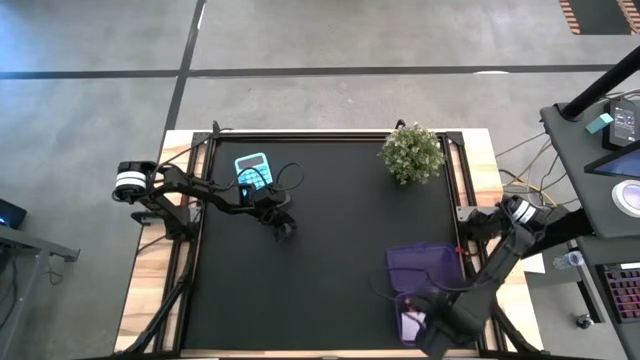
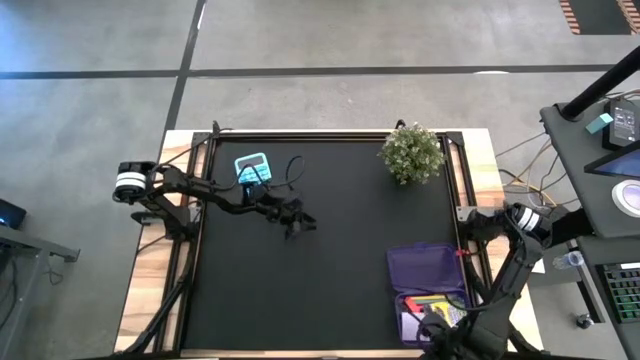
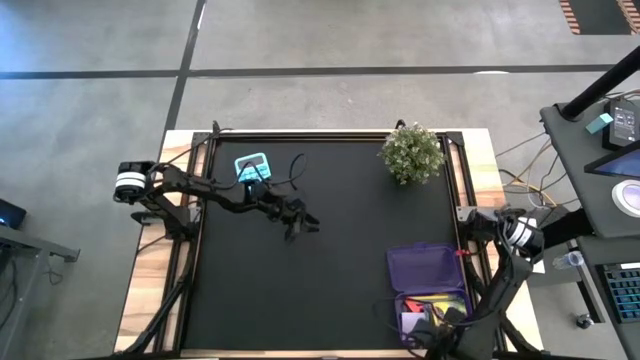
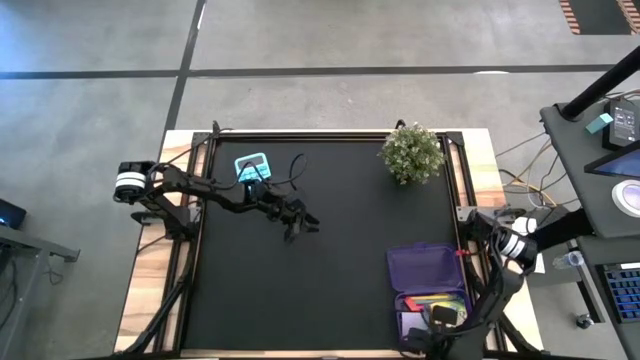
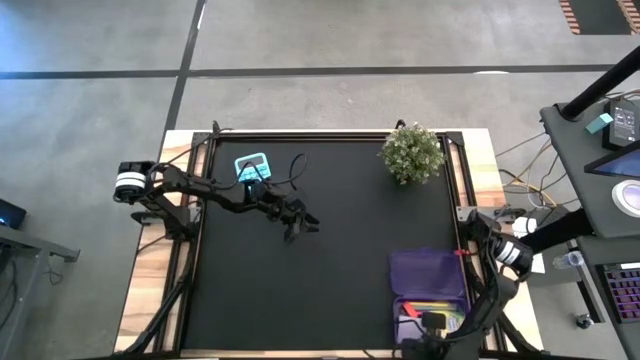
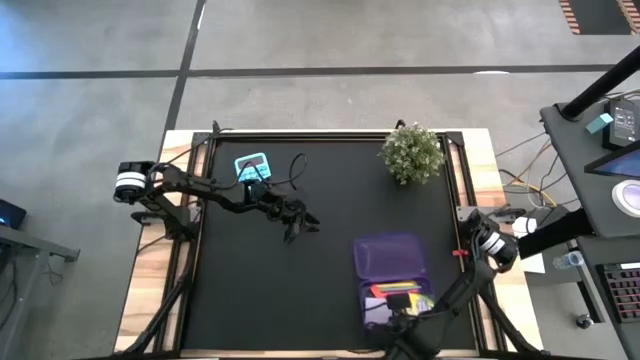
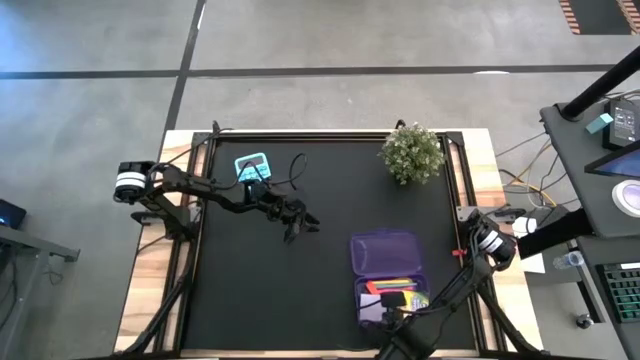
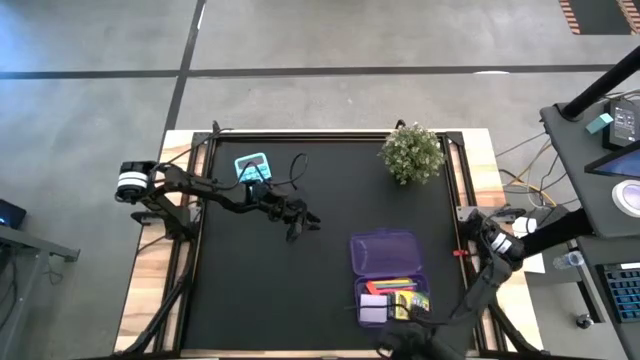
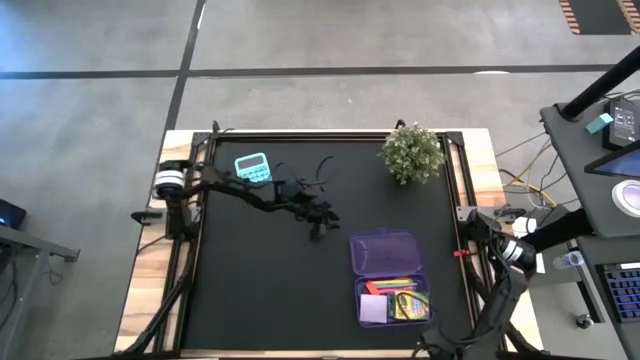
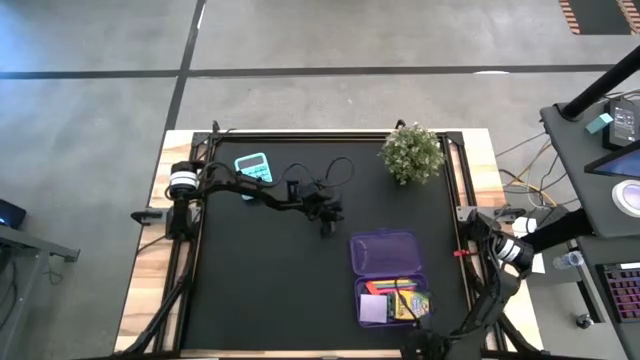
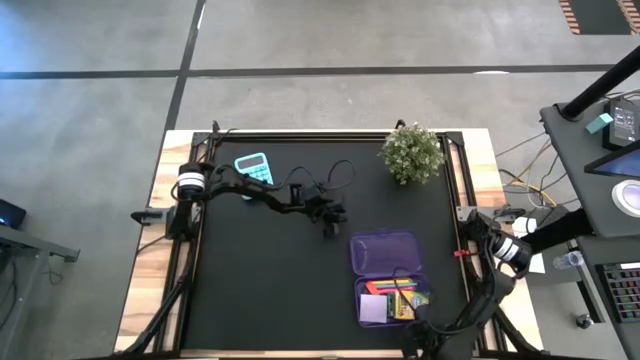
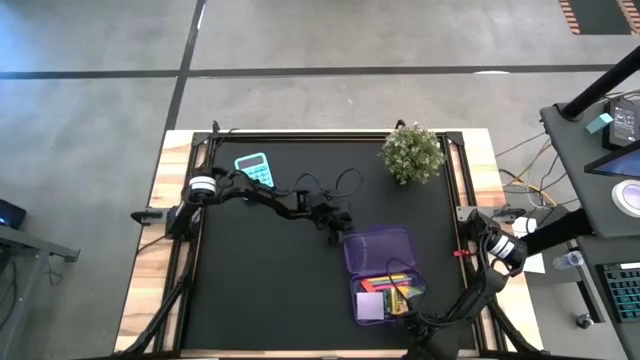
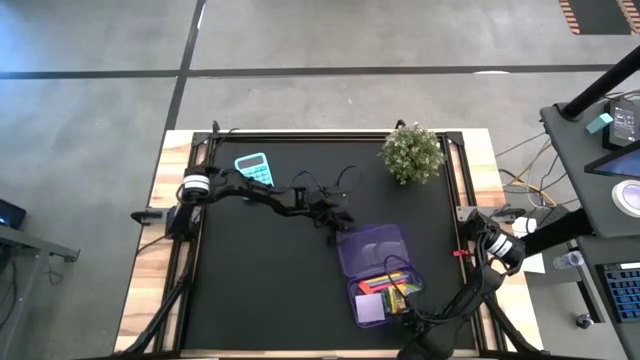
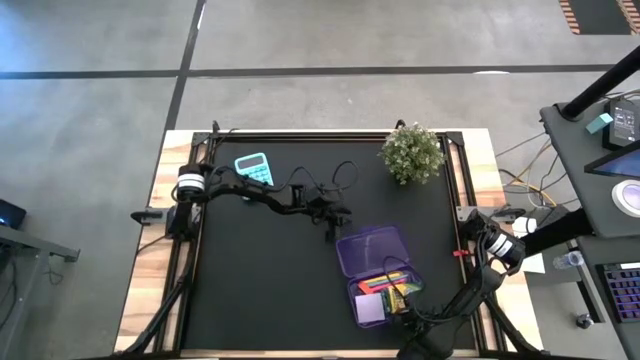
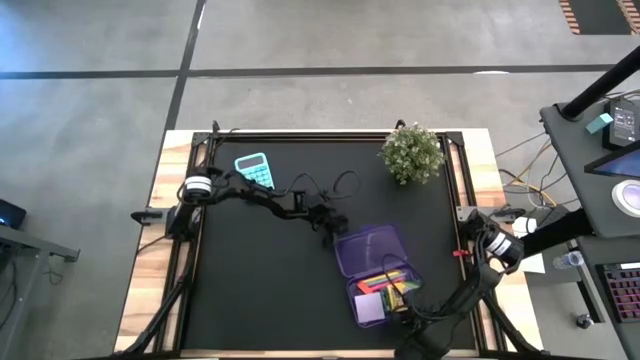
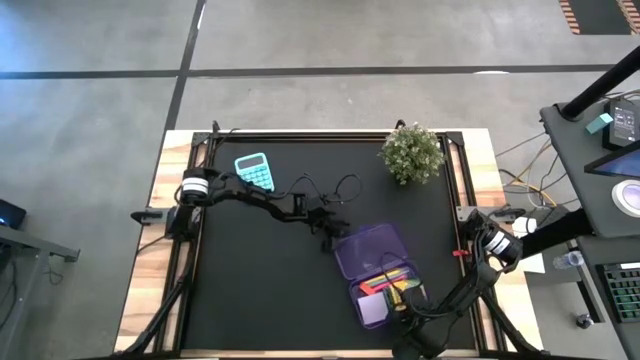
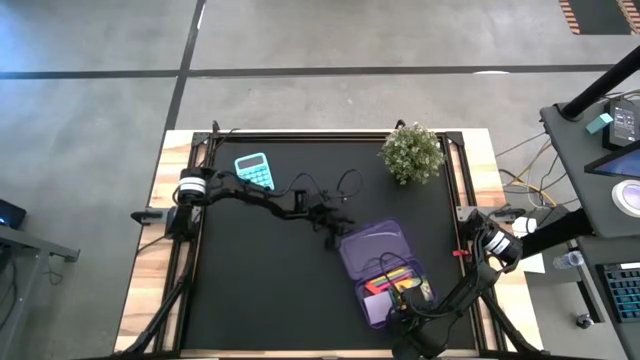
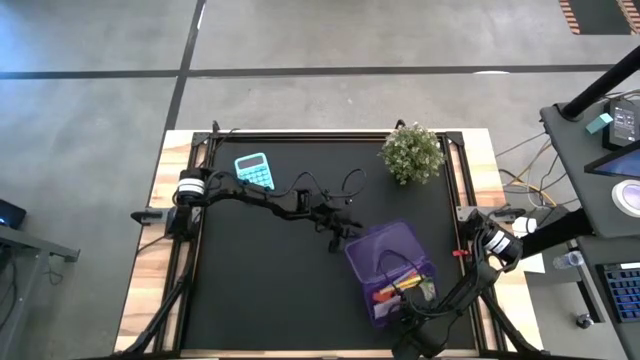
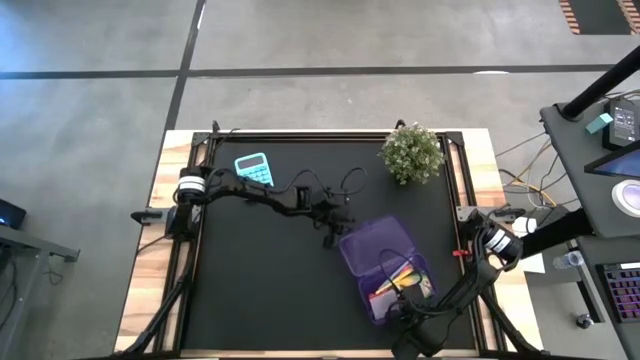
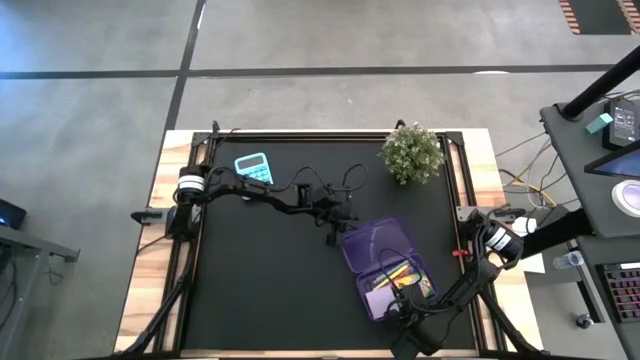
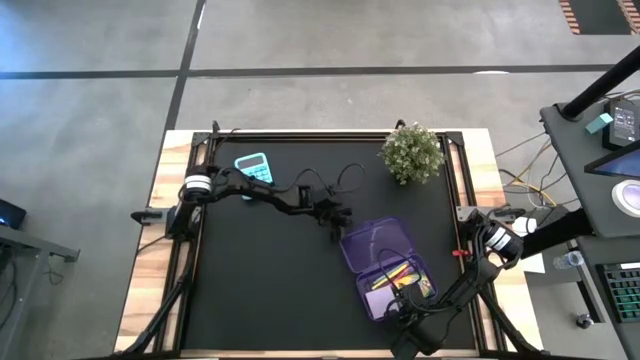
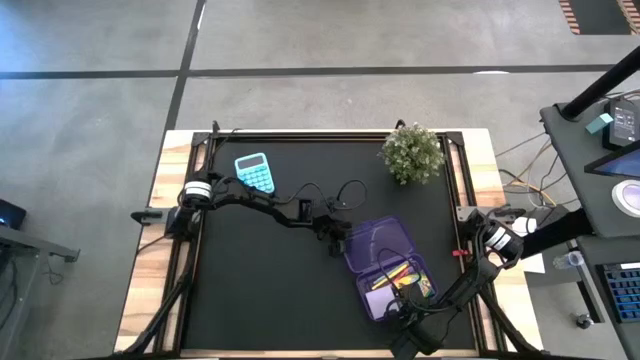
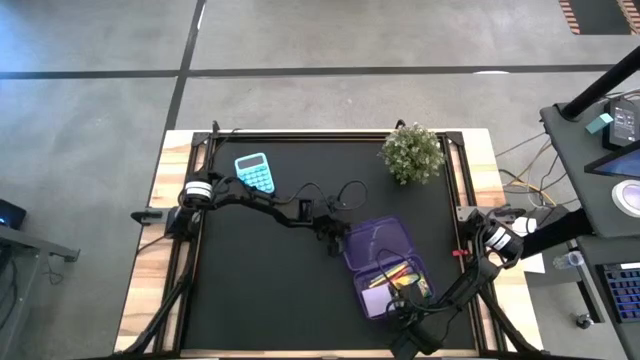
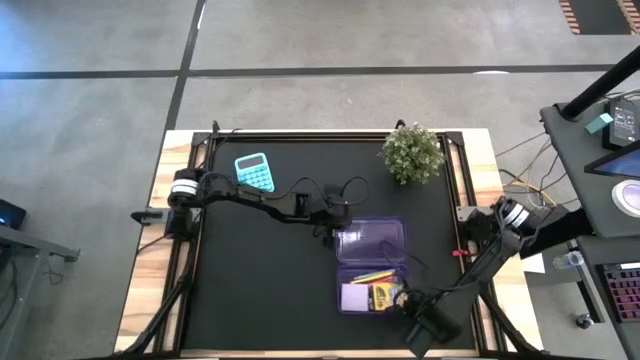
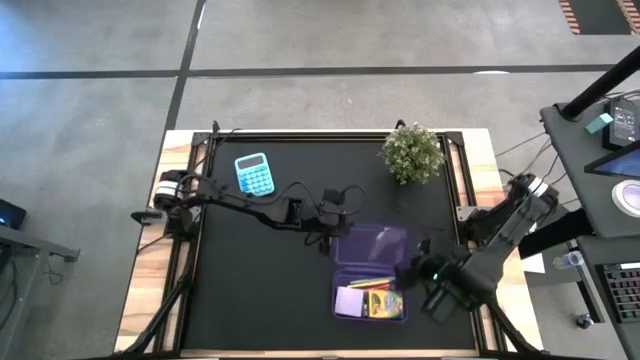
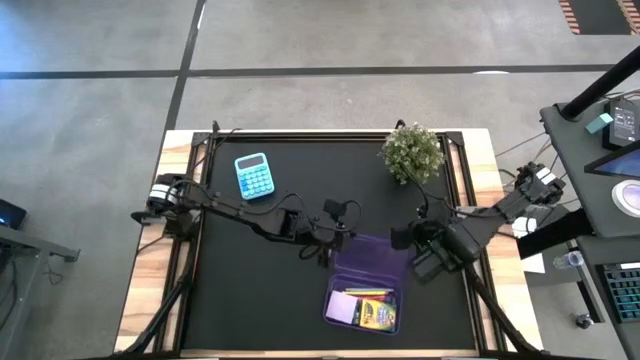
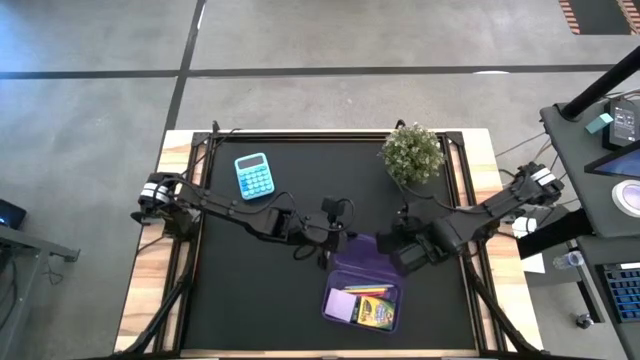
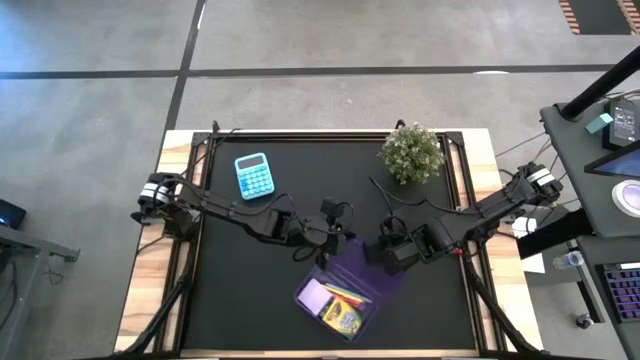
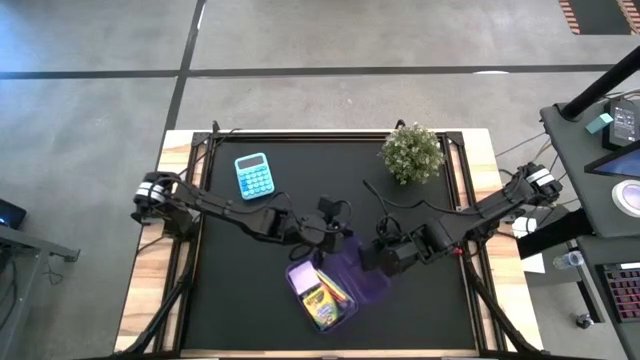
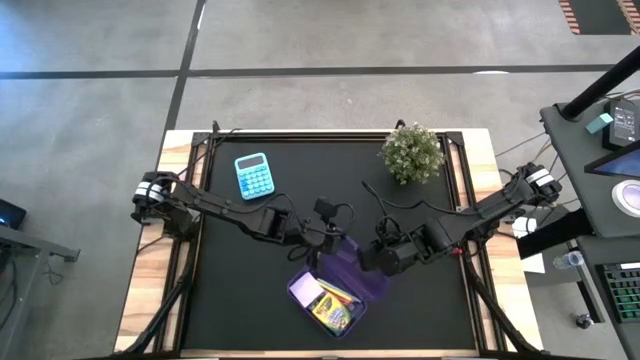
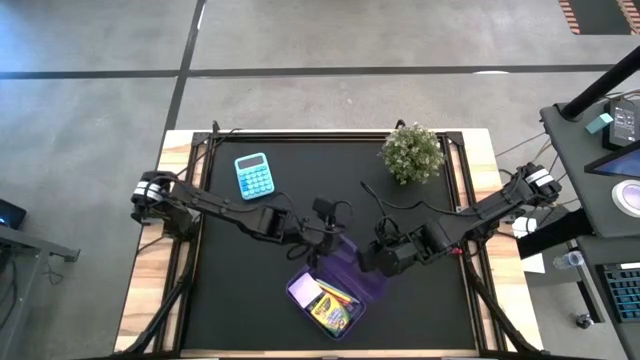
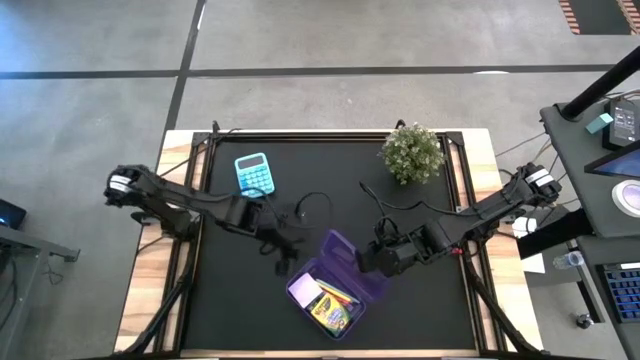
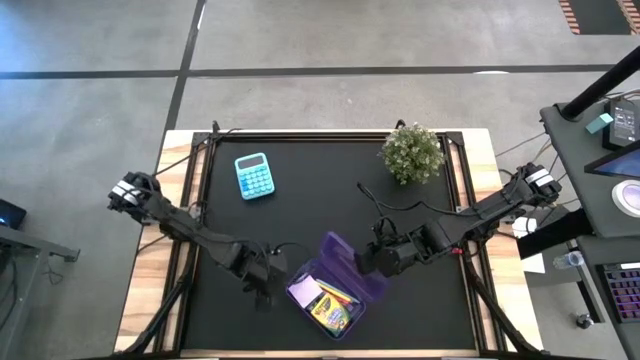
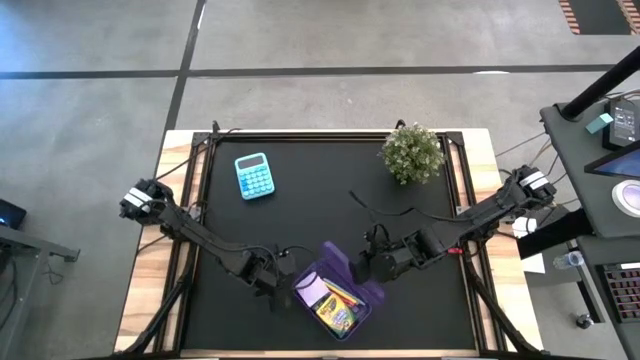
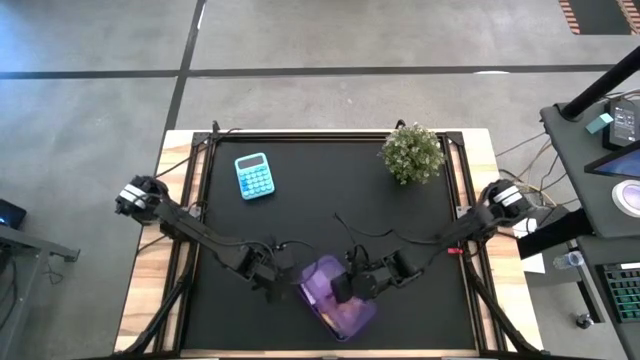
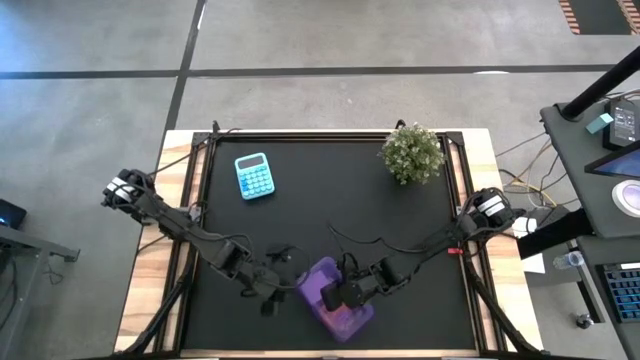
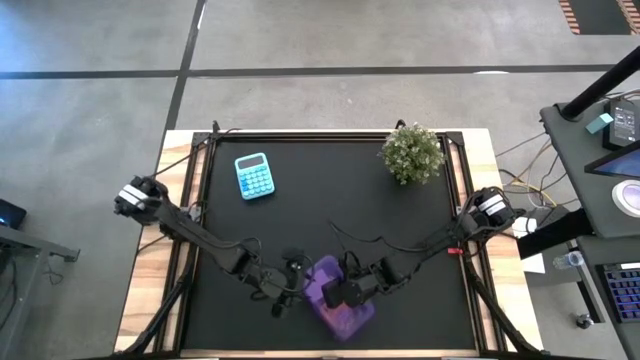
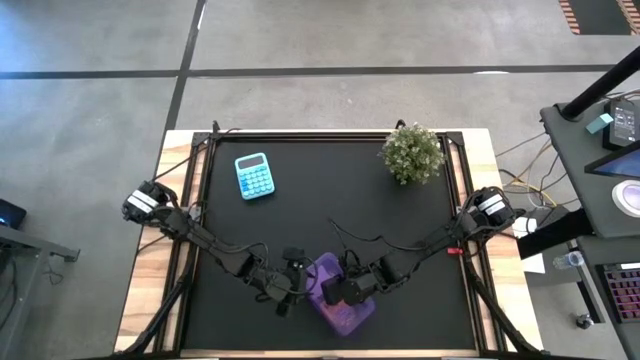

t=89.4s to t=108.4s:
Task: Pack school essentials
Close the supply box

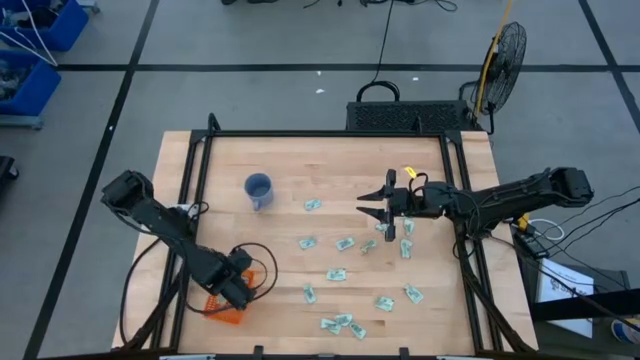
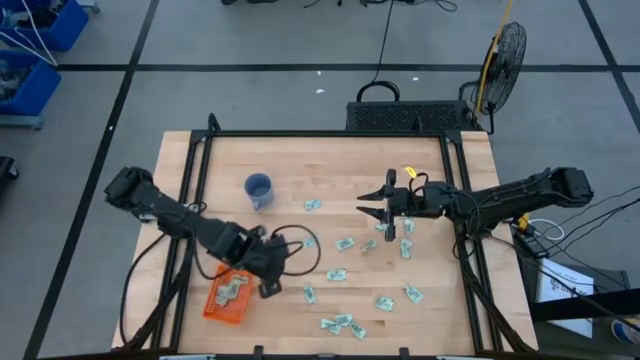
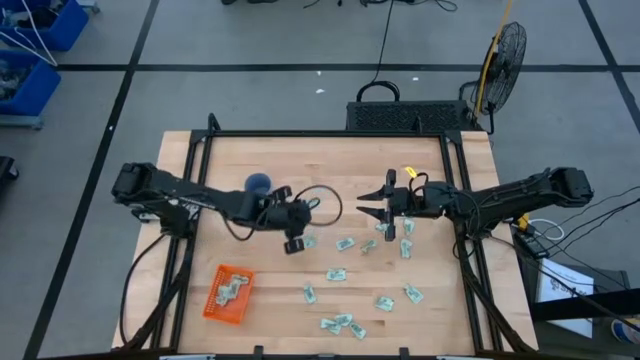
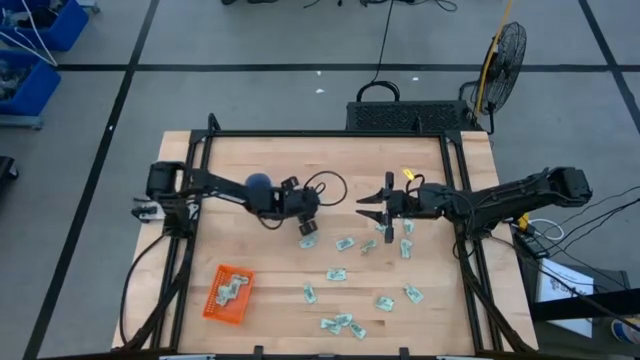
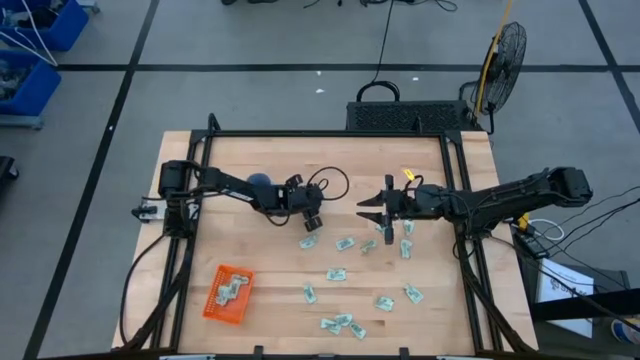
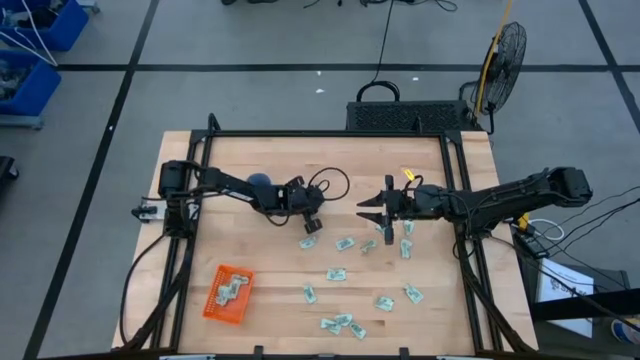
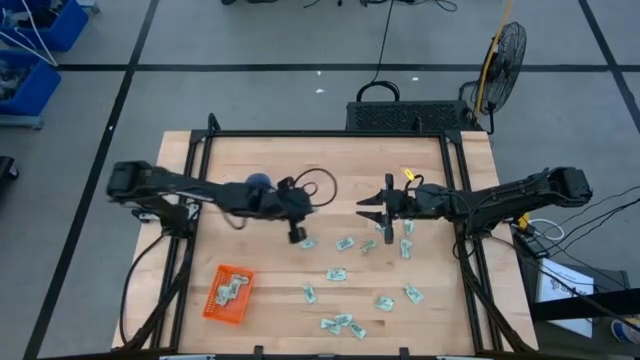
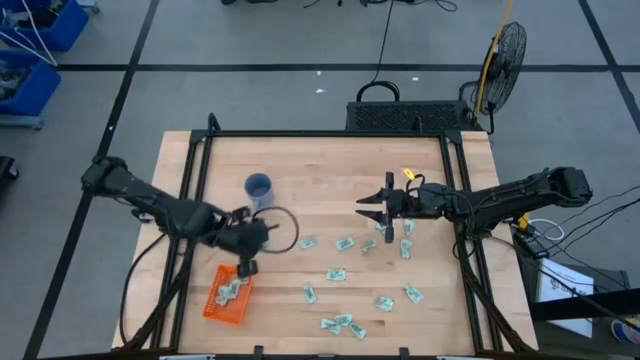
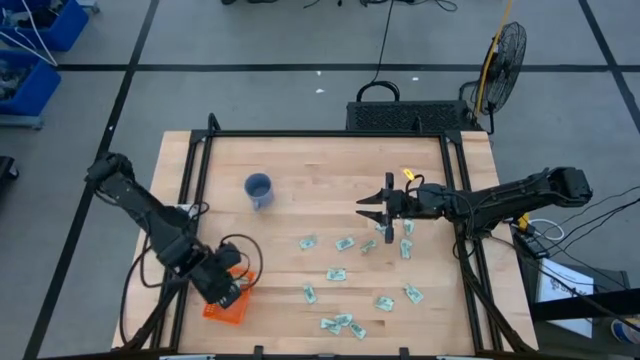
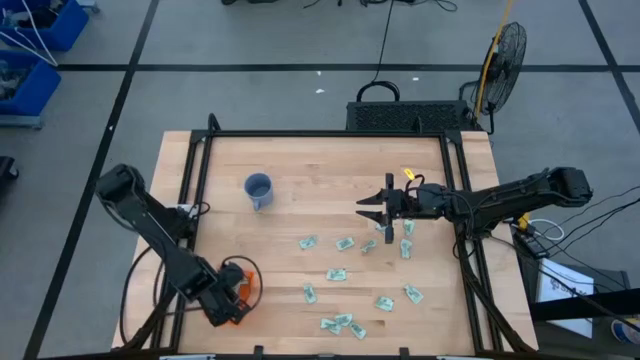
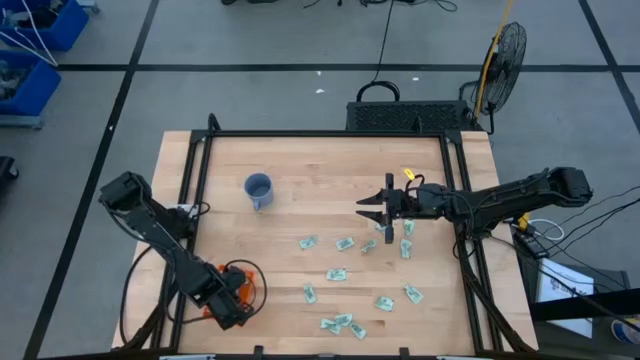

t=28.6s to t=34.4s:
Task: Pick and place Stevia / Truvia into bins
Put the stevia packet into the orange bin
